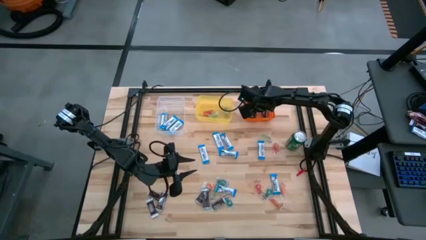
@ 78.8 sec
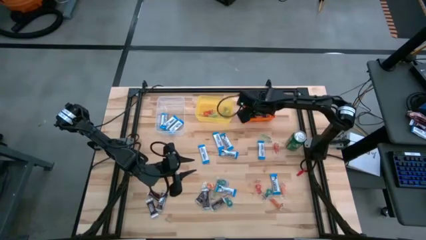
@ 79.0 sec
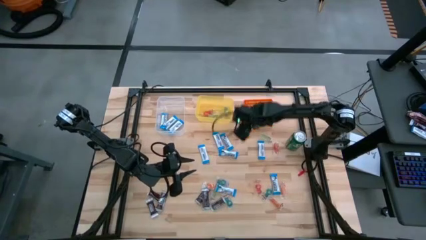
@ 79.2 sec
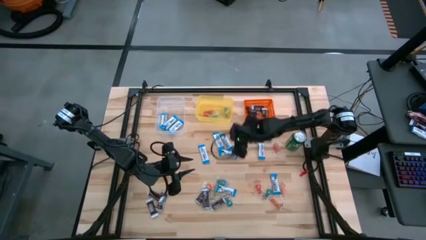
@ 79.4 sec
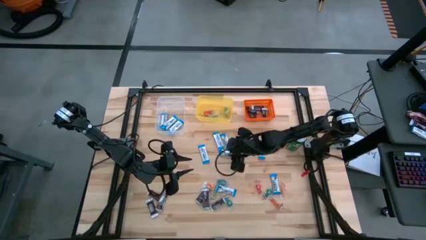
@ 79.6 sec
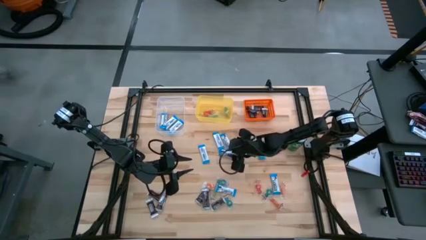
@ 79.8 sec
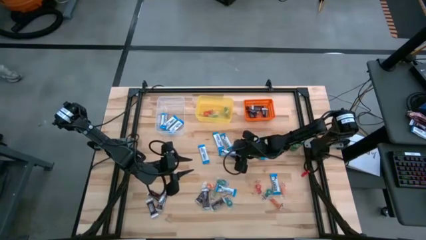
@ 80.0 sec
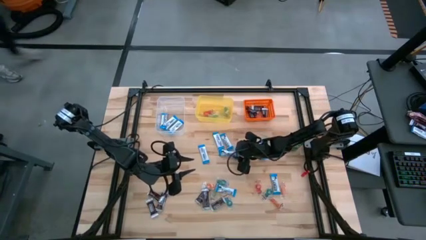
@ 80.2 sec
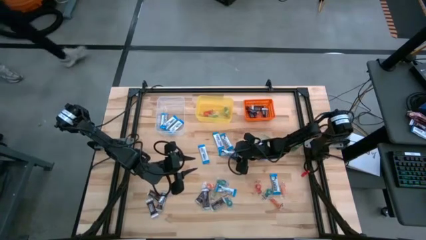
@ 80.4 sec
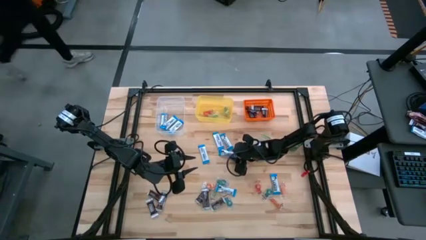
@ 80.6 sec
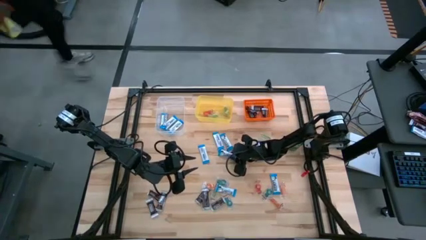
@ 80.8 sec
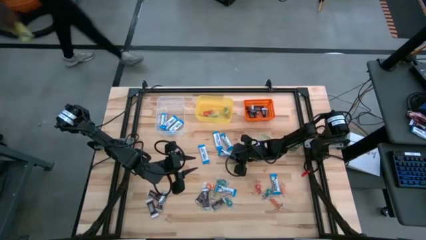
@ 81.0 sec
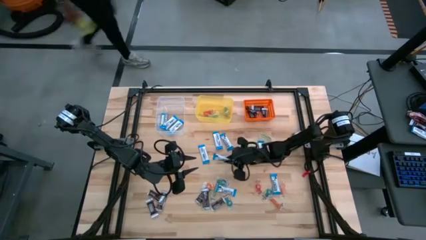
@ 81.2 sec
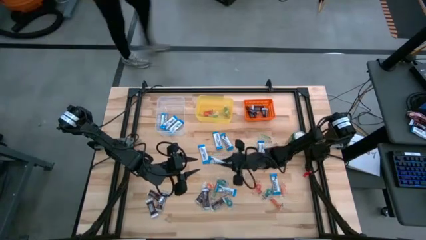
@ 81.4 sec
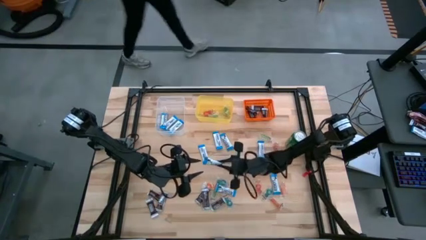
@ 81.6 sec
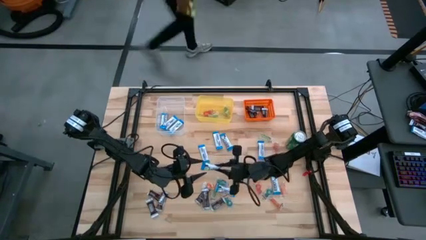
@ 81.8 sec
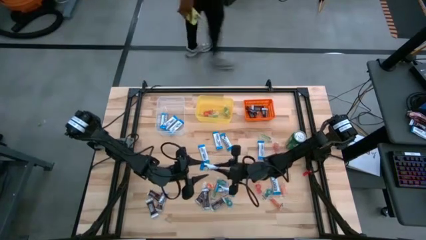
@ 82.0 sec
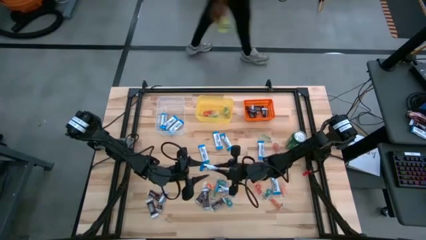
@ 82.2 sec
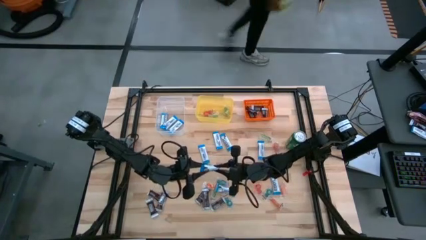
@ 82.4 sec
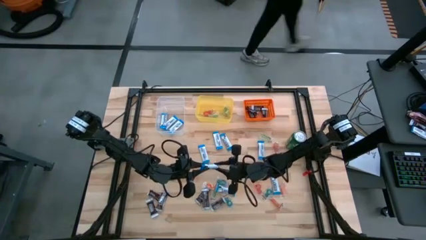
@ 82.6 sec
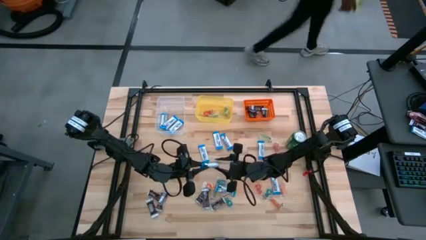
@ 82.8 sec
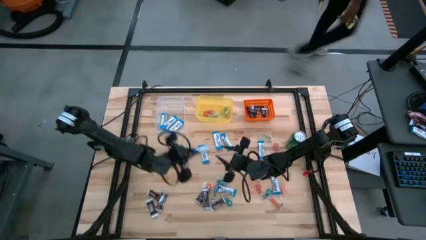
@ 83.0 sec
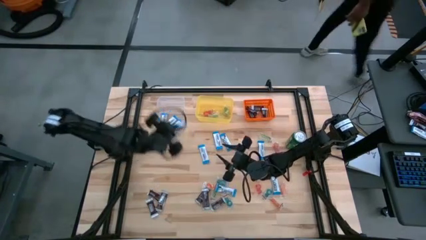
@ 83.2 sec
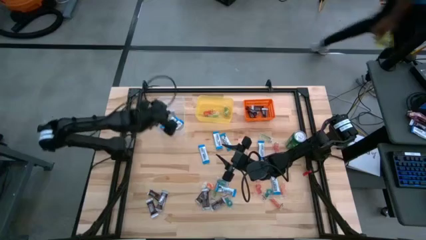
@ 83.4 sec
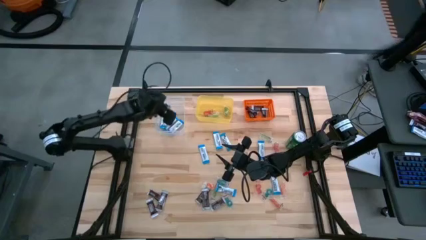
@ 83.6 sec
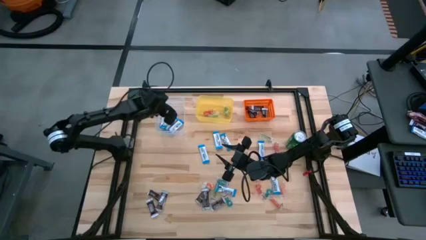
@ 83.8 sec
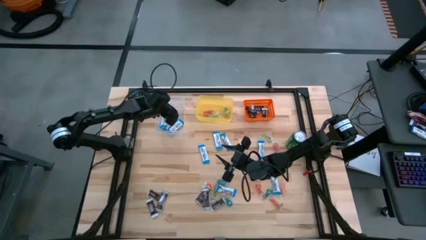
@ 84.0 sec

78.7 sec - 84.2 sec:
Task: Sort candy
Put the white chocolate into the transparent bin

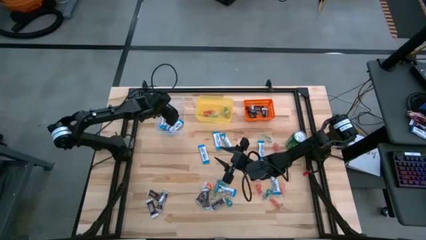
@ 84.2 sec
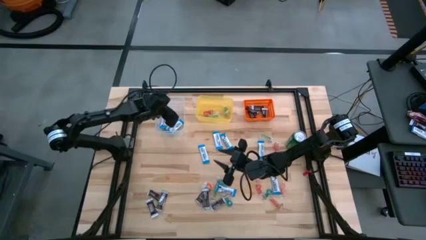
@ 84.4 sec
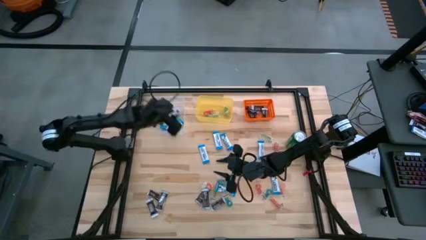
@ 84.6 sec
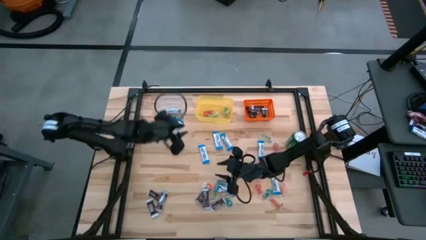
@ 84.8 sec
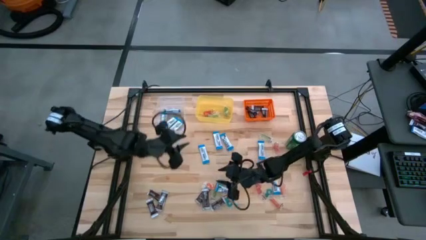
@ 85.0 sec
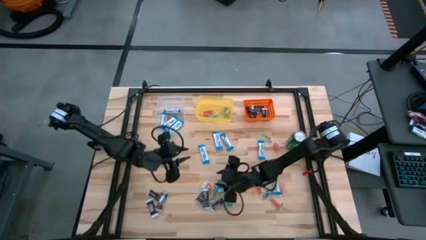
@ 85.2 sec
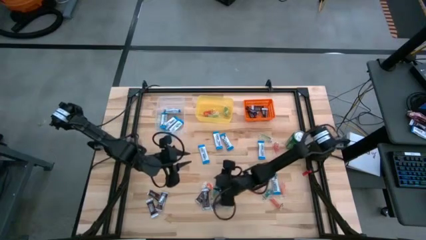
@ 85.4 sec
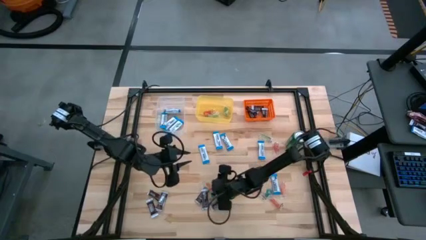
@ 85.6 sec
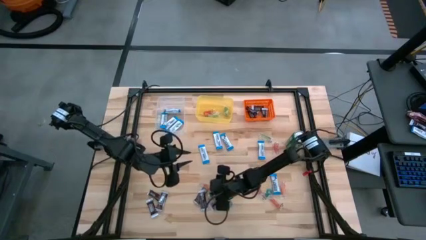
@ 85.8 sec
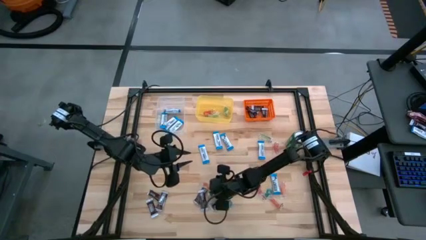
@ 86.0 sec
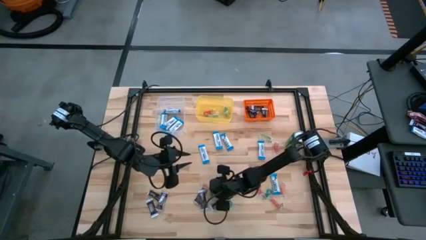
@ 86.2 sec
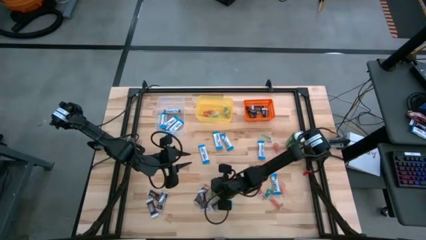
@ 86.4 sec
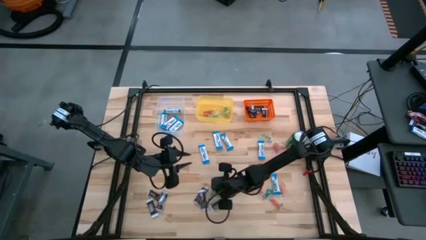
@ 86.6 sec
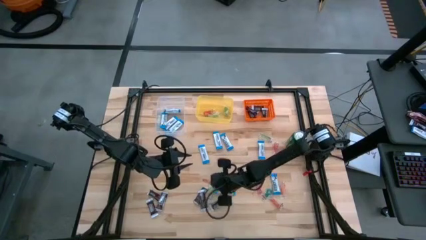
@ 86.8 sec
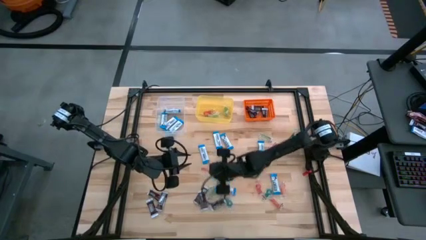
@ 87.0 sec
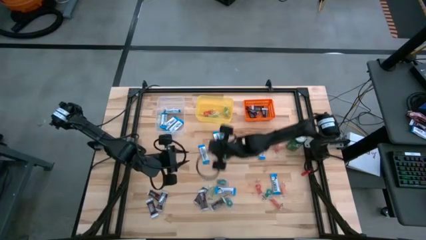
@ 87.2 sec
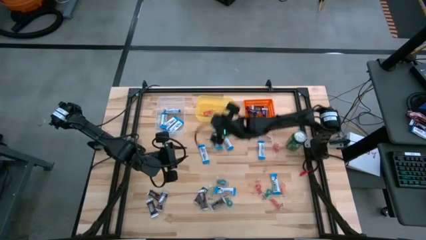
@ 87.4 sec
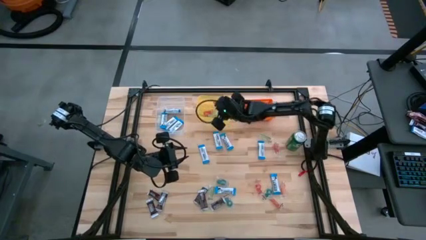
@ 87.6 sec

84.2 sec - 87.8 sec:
Put the orange gummy into the yellow bin

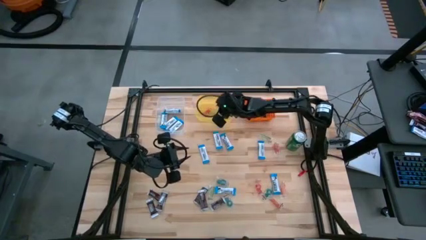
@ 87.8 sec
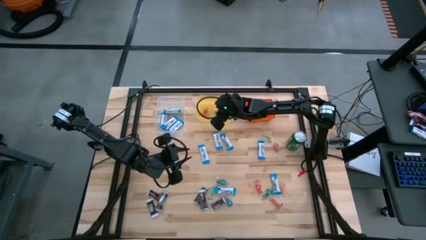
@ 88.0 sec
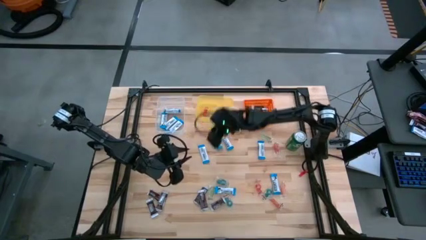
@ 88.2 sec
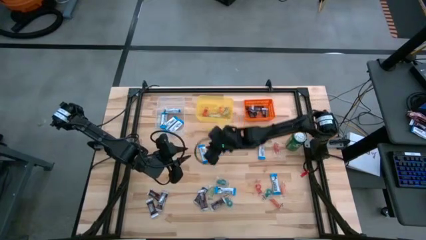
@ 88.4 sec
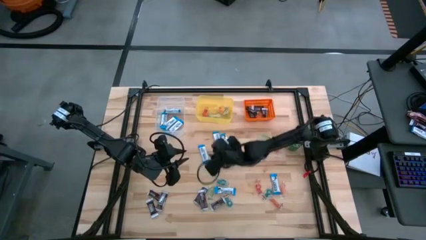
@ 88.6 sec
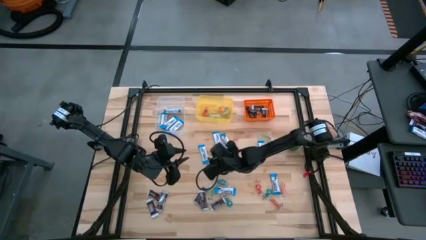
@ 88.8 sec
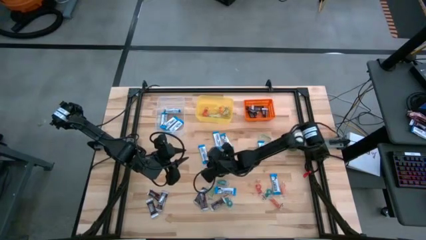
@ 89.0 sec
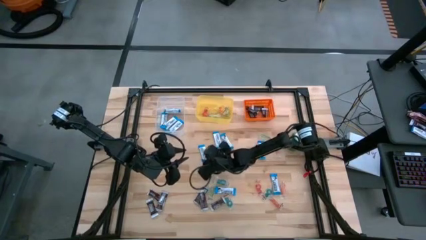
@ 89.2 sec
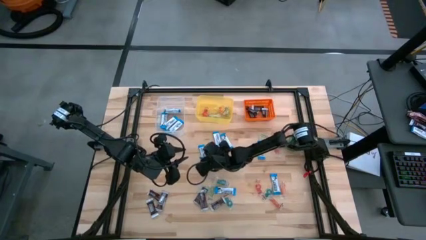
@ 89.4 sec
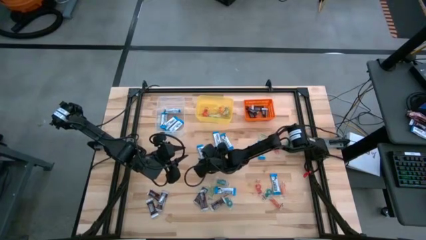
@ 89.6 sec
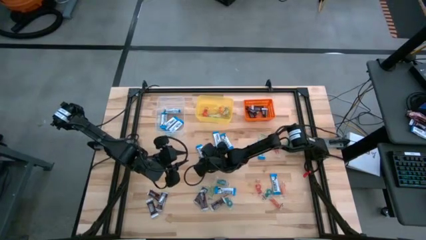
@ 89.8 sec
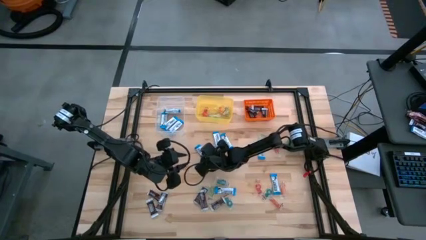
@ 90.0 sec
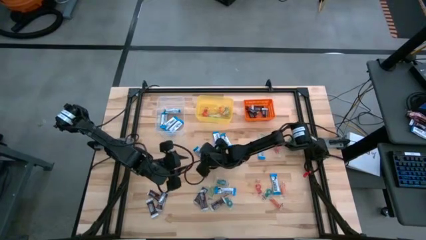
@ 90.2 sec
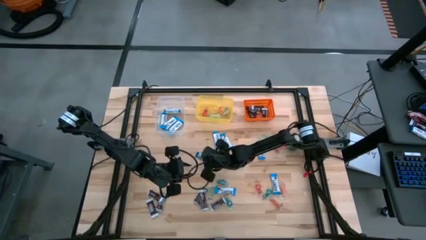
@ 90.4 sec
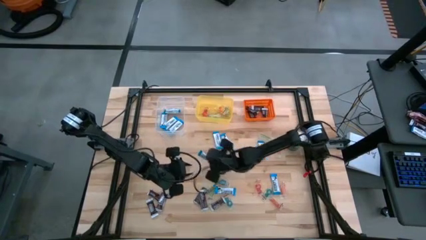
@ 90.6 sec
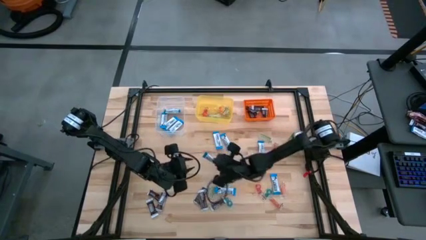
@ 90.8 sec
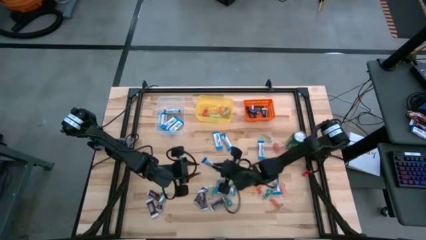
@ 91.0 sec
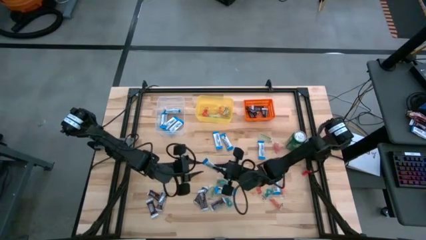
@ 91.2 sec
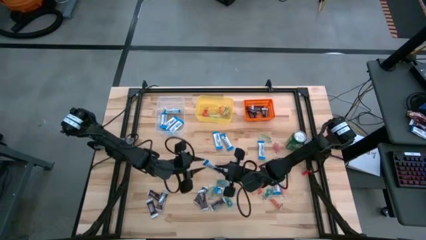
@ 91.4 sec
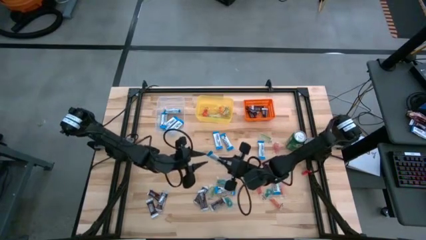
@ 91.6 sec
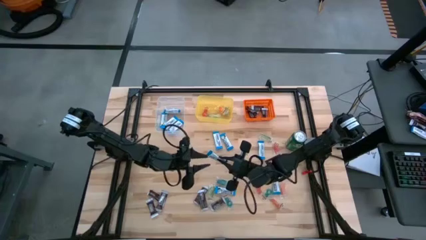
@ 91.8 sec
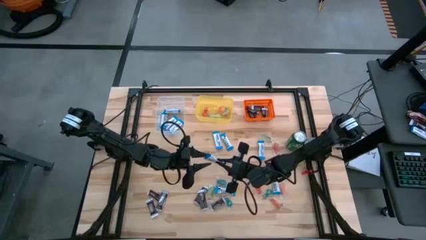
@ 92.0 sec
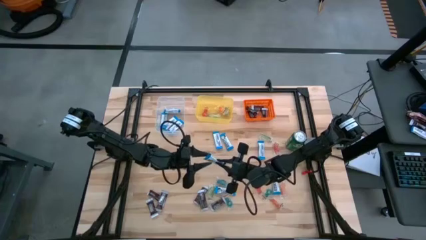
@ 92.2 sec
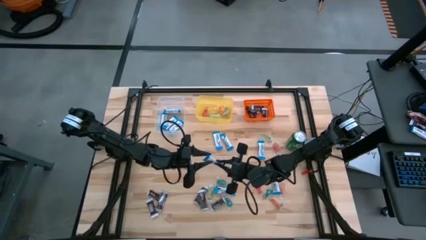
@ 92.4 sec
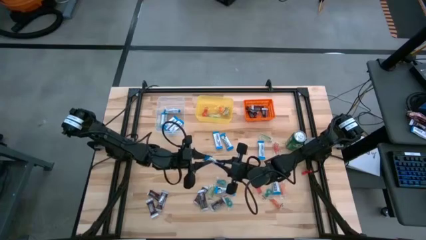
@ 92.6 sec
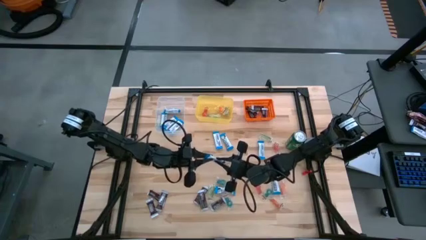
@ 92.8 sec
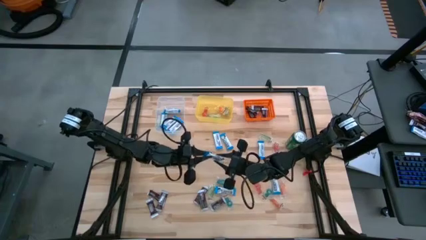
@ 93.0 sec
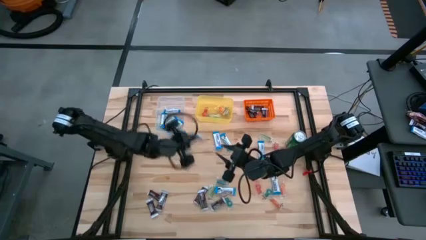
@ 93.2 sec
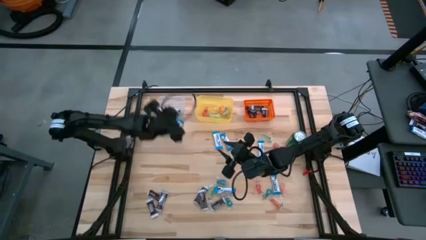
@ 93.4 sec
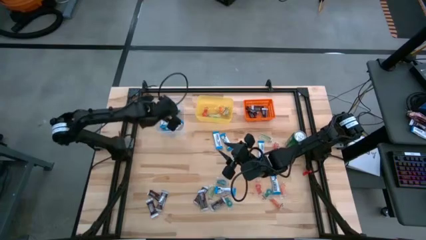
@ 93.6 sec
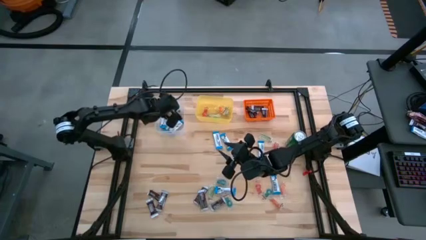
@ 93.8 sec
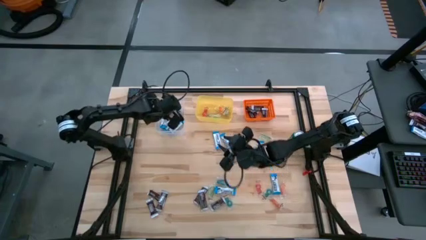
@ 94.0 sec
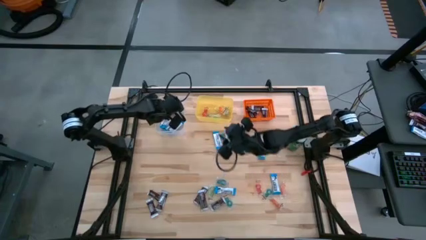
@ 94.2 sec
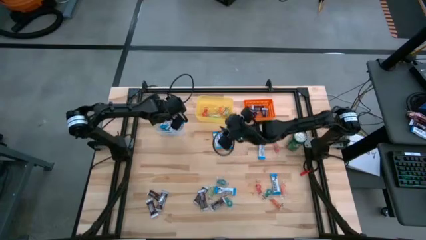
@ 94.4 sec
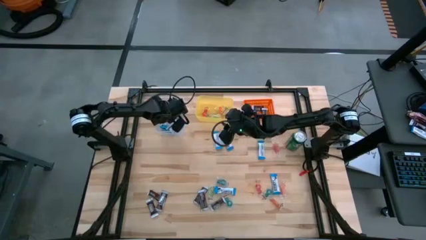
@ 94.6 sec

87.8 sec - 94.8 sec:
Put the white chocolate into the transparent bin
